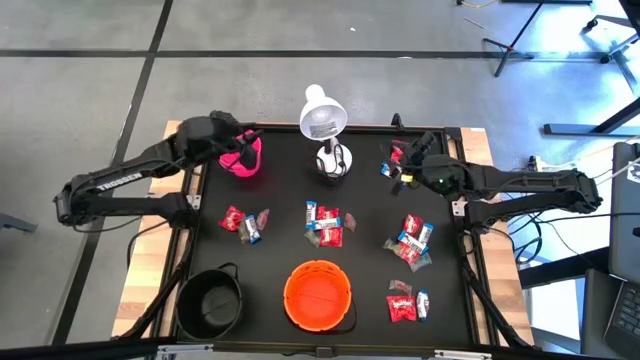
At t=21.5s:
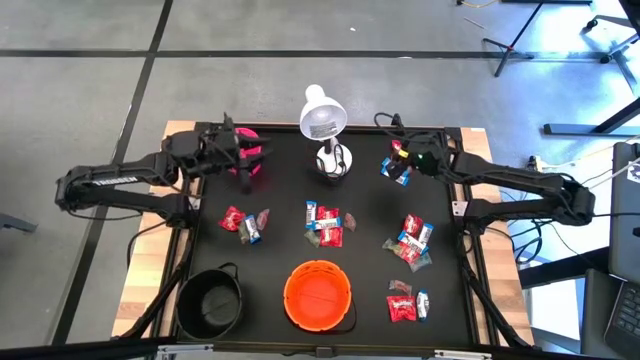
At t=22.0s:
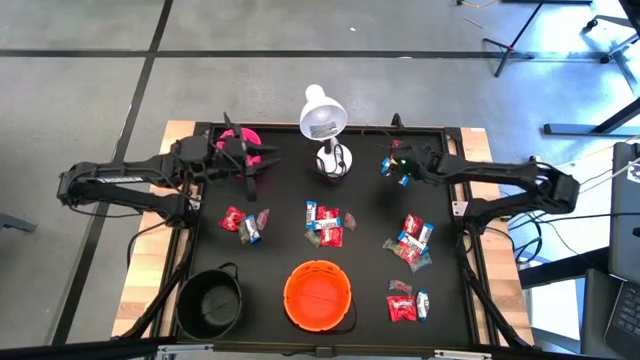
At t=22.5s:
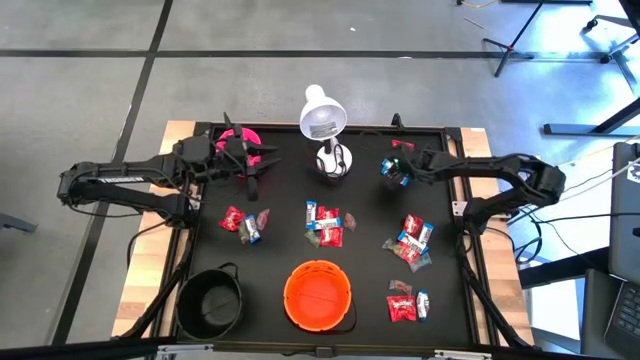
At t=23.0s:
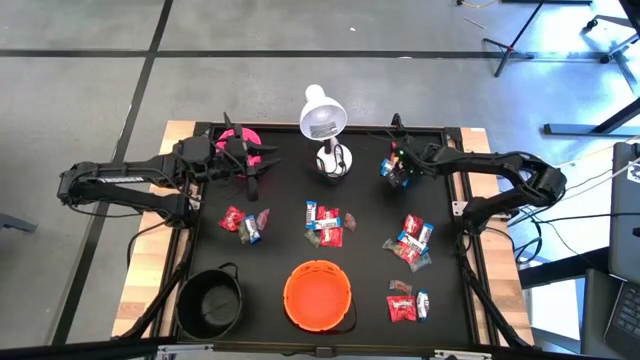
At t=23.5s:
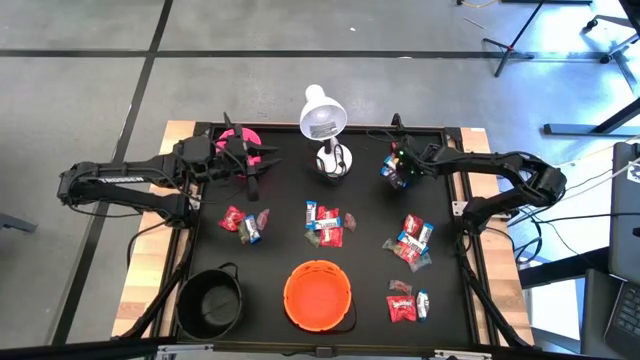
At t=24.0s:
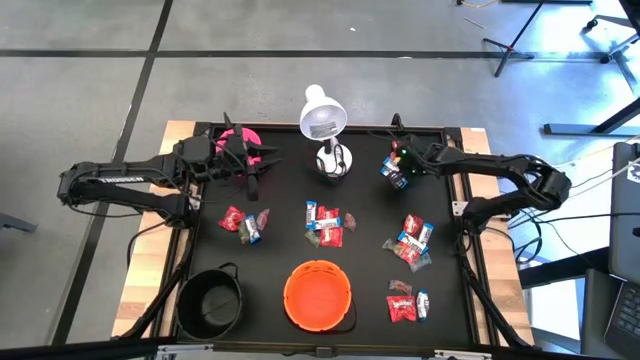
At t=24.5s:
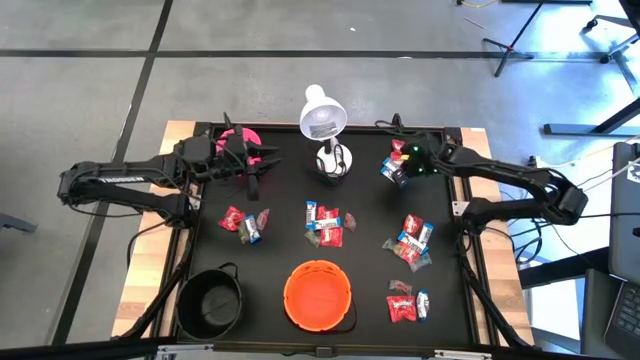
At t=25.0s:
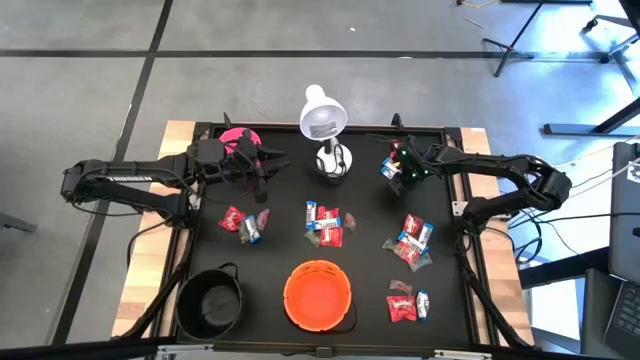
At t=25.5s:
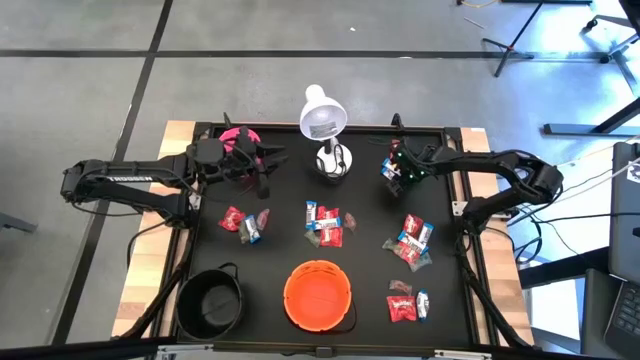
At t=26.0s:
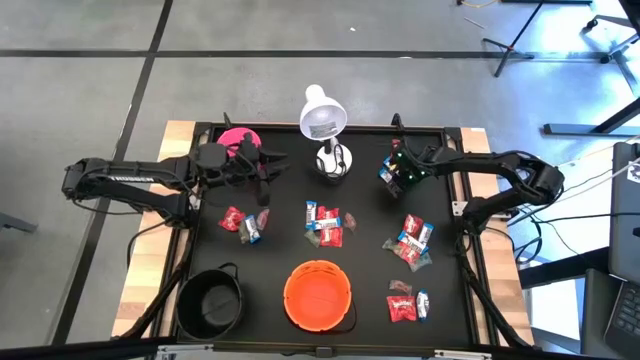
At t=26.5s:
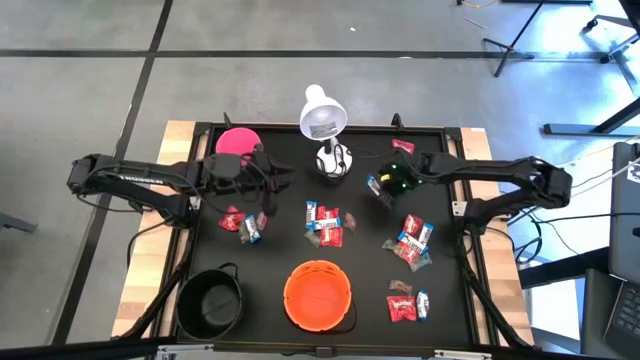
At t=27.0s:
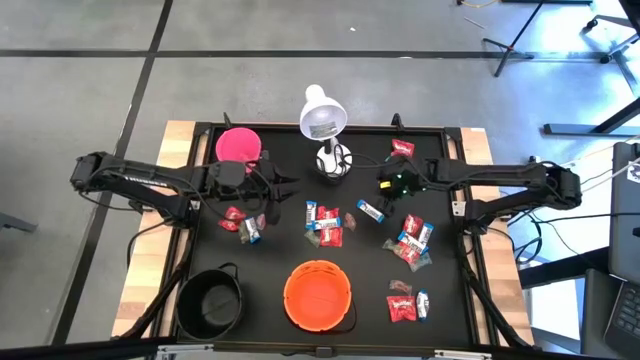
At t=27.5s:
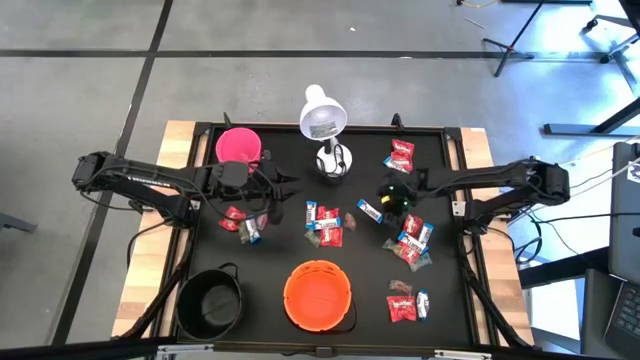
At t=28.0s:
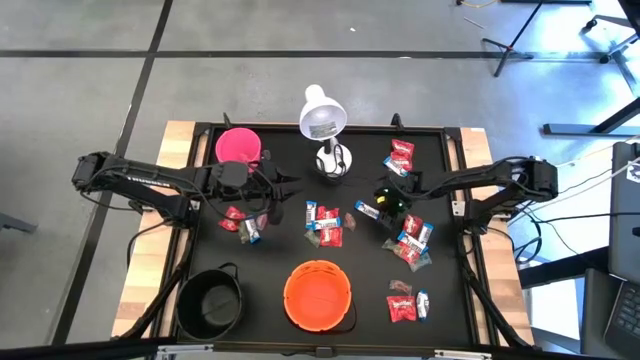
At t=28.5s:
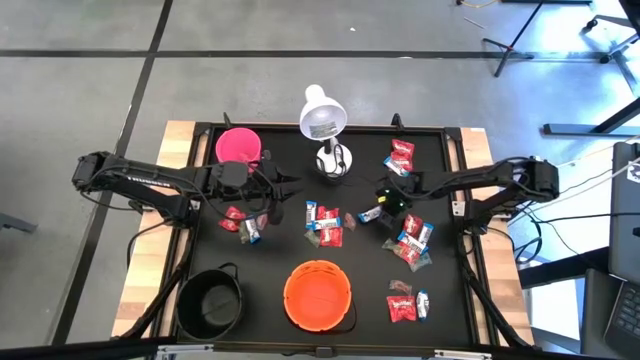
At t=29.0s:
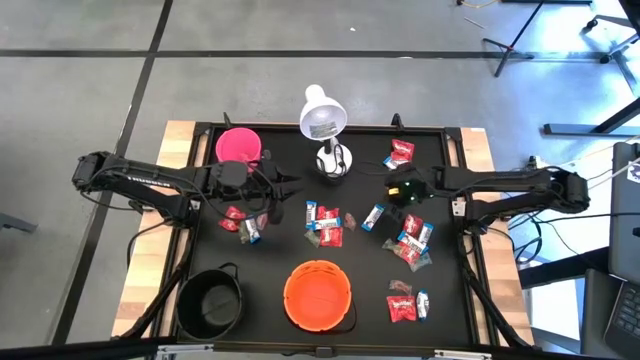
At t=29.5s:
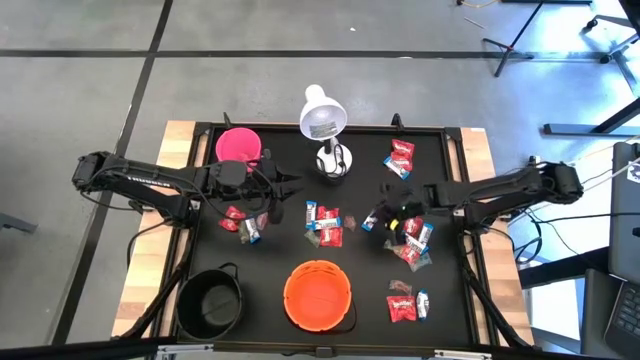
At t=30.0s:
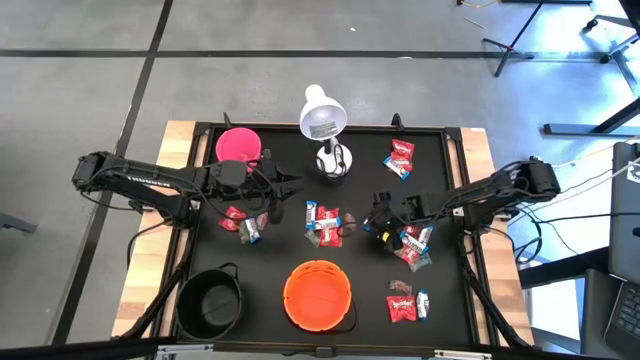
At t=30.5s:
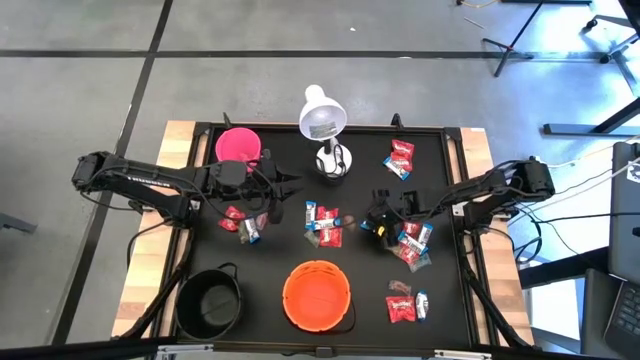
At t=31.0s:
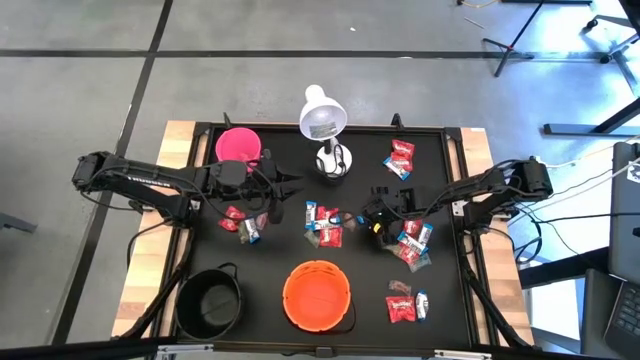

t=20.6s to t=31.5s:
Task: Sort candy
Put the white candy into the black bucket

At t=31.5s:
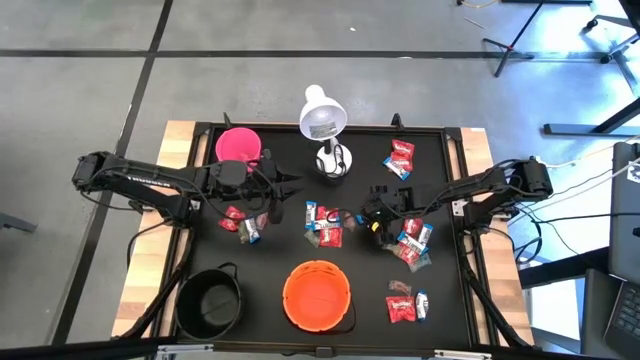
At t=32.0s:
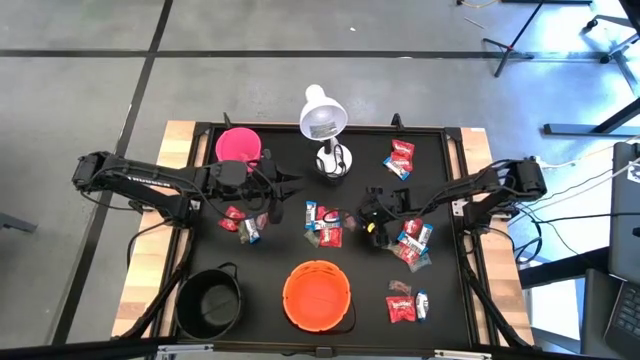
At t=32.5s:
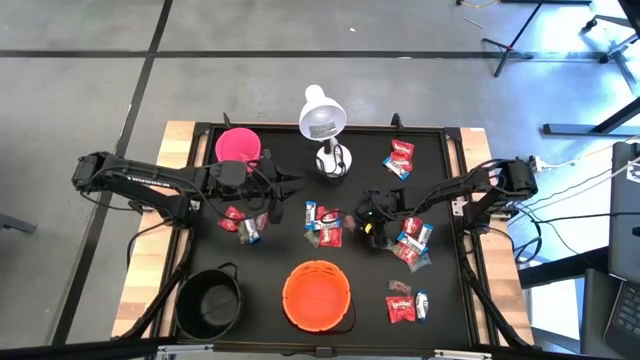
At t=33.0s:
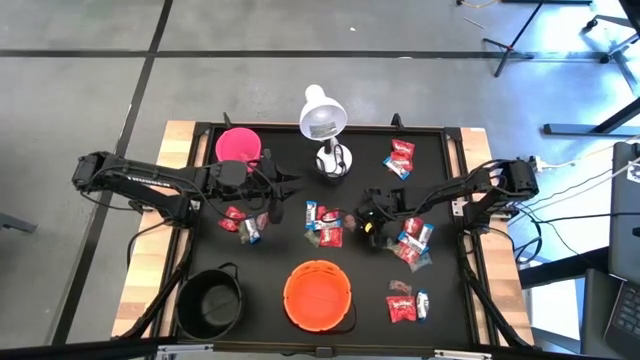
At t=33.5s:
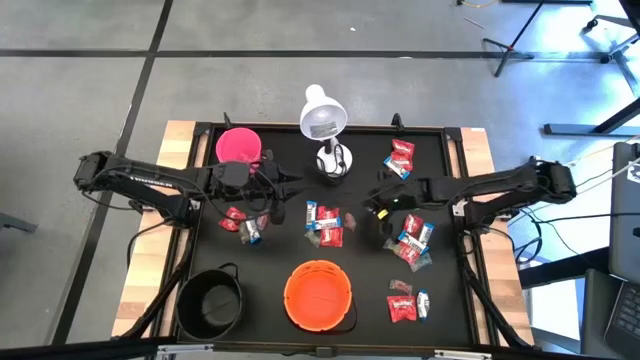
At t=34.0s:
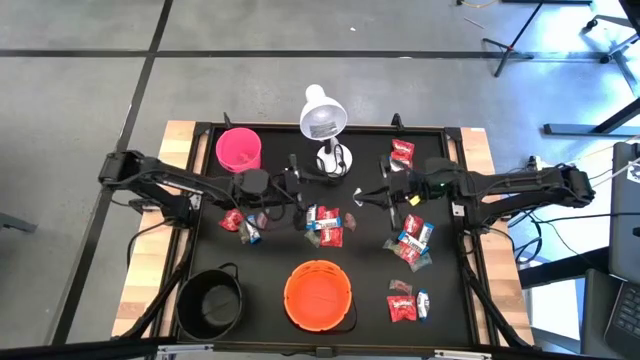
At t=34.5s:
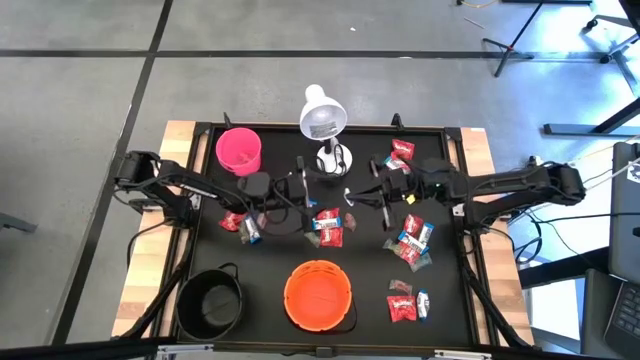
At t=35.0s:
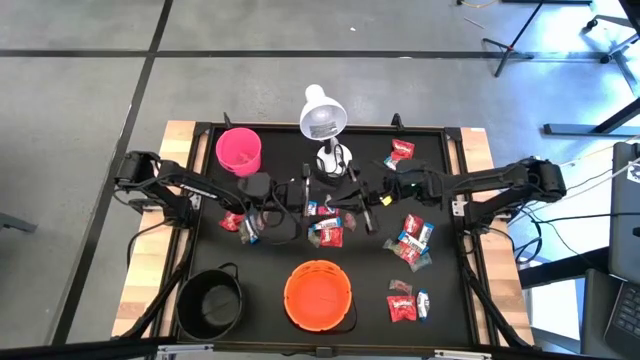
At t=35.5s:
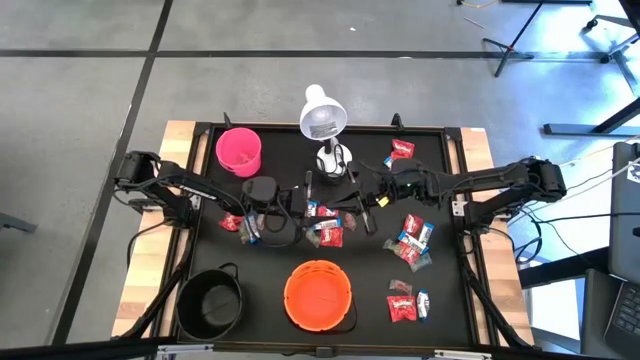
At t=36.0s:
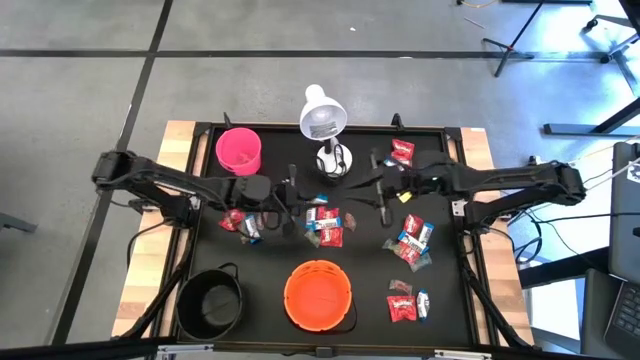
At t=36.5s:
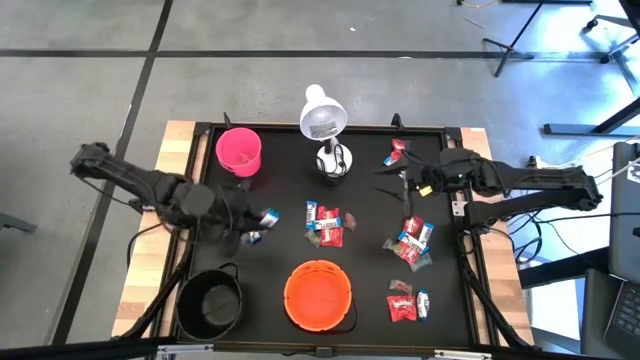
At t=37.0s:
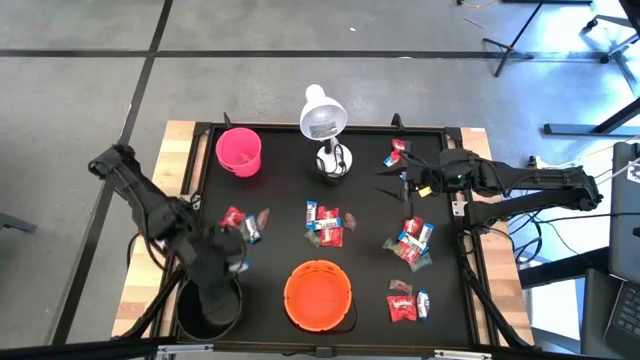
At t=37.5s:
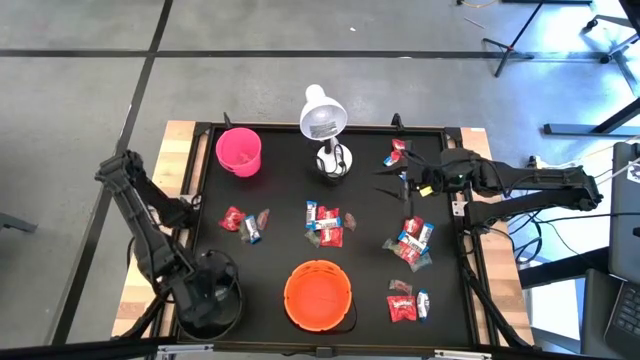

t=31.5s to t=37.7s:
Put the white candy into the black bucket

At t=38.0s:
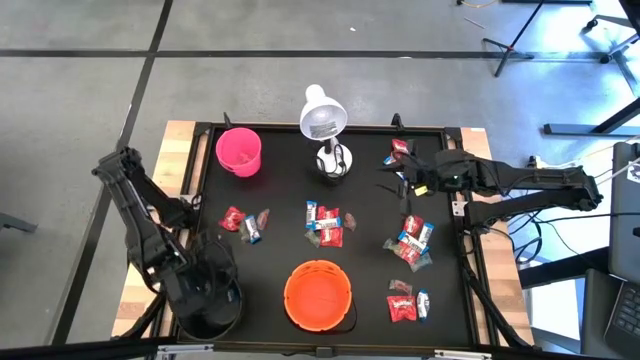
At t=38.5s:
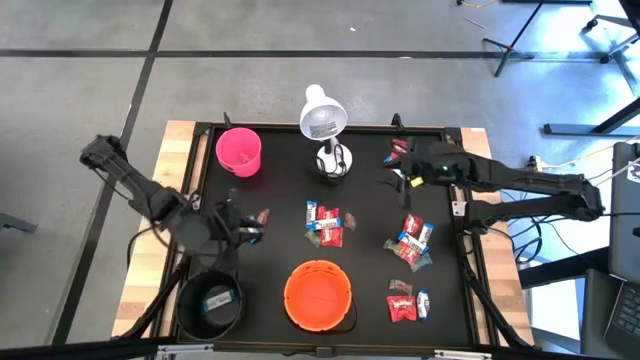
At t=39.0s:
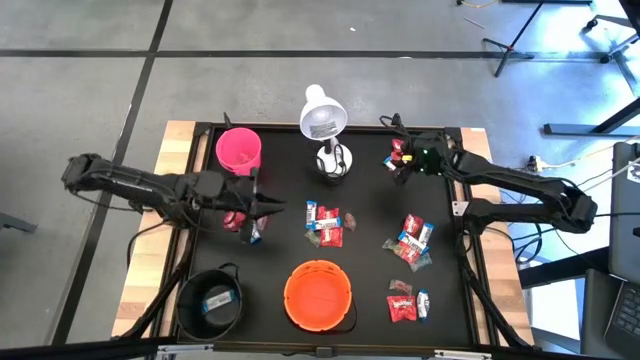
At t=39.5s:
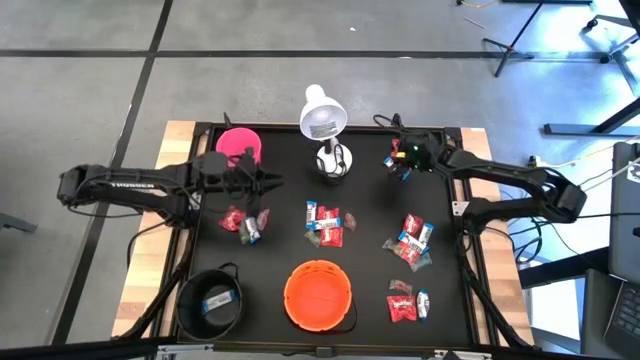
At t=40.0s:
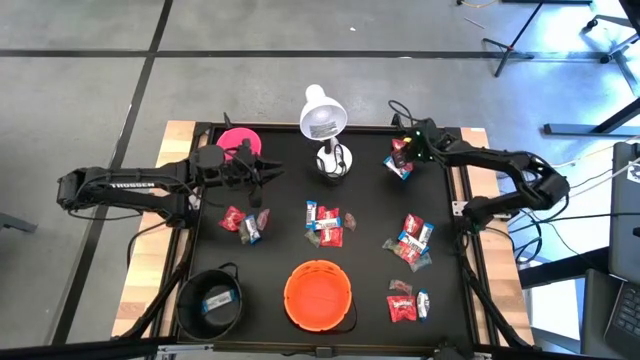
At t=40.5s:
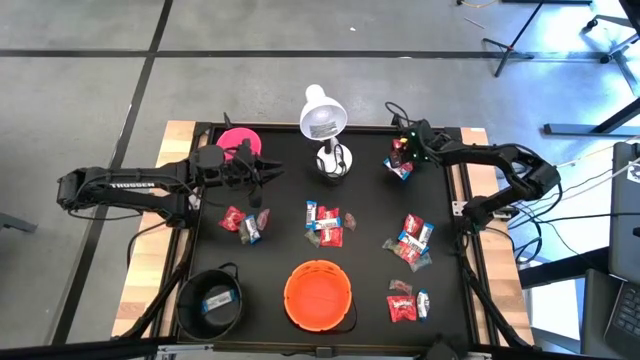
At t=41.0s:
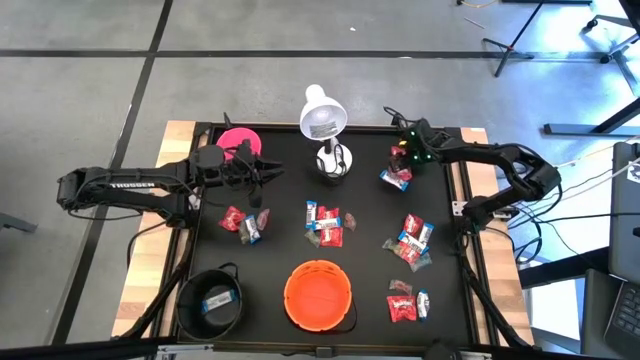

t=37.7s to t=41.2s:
Adjust the colored candies
